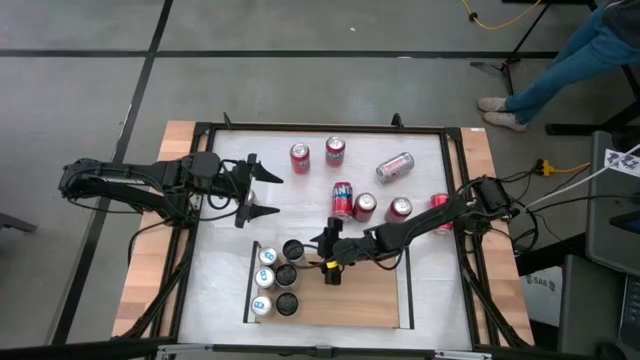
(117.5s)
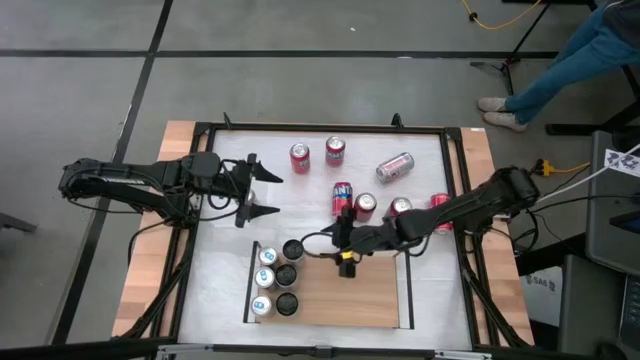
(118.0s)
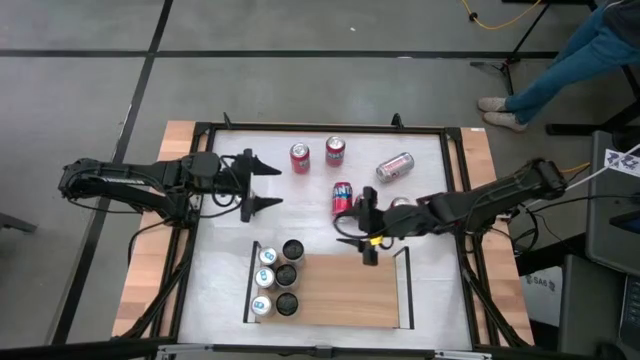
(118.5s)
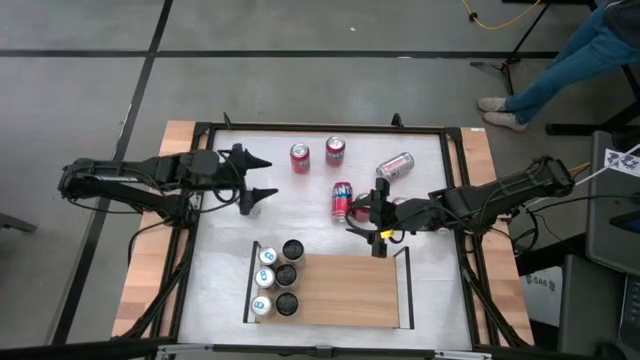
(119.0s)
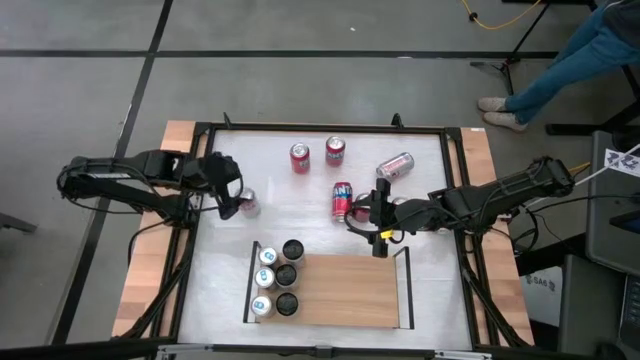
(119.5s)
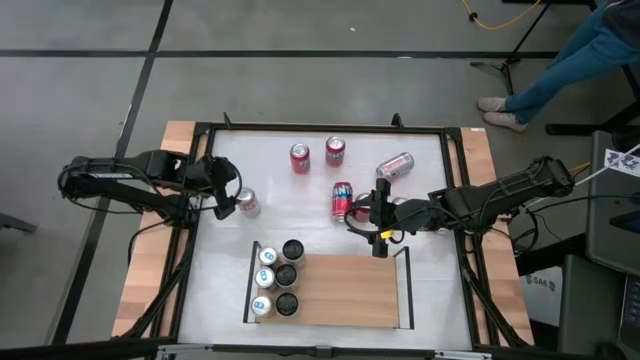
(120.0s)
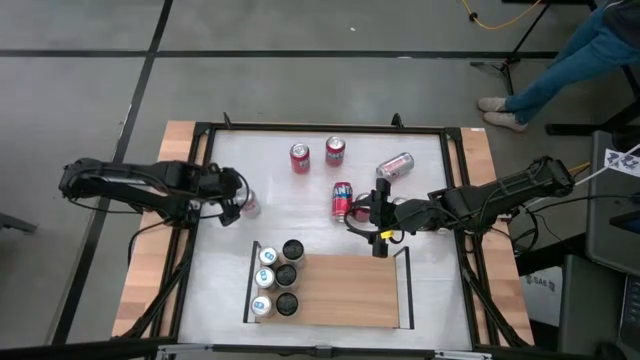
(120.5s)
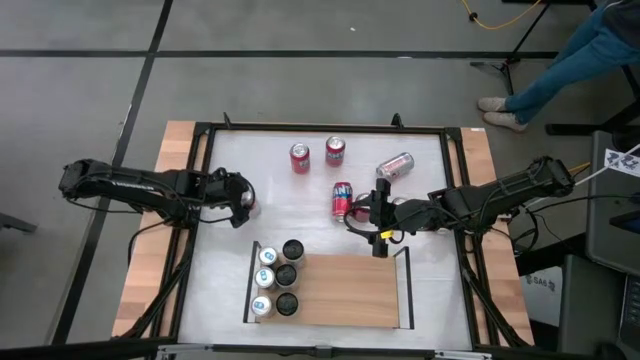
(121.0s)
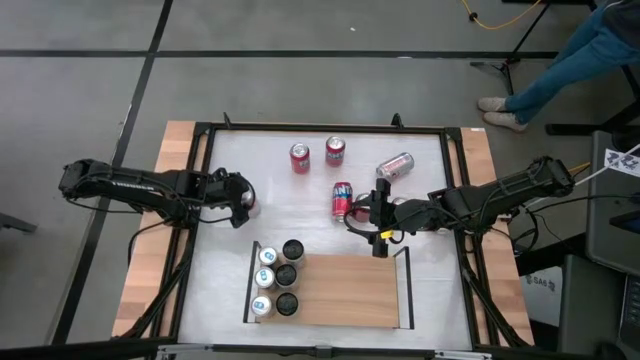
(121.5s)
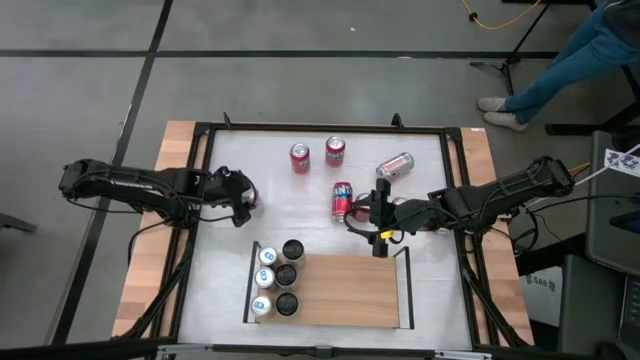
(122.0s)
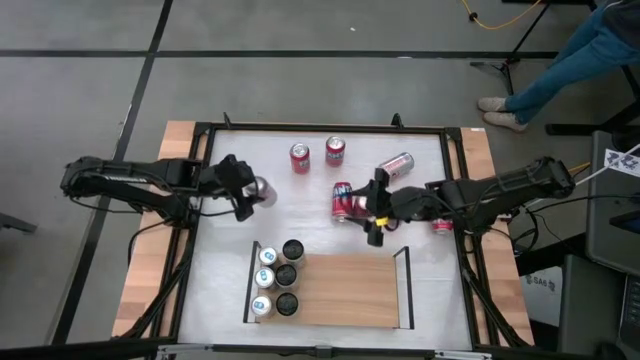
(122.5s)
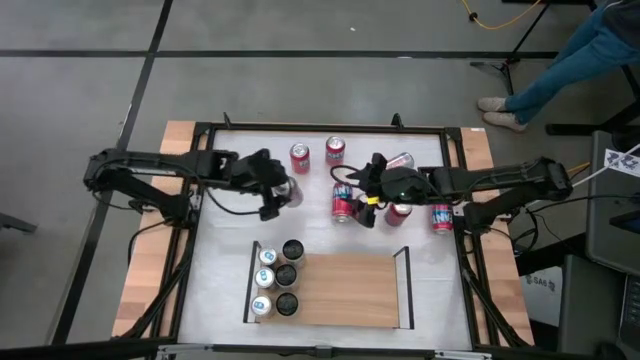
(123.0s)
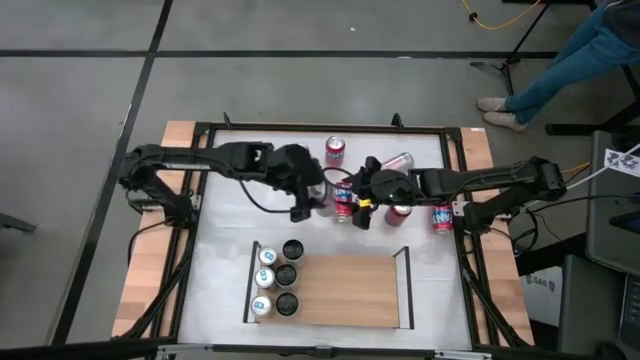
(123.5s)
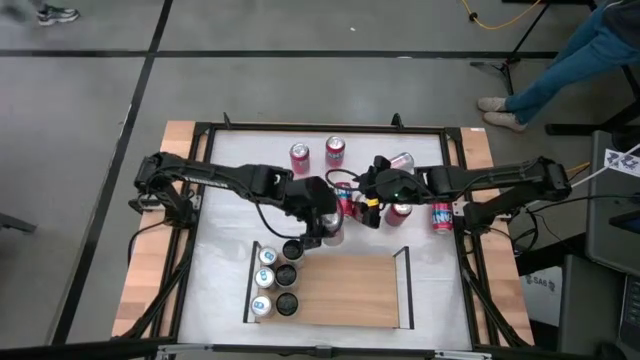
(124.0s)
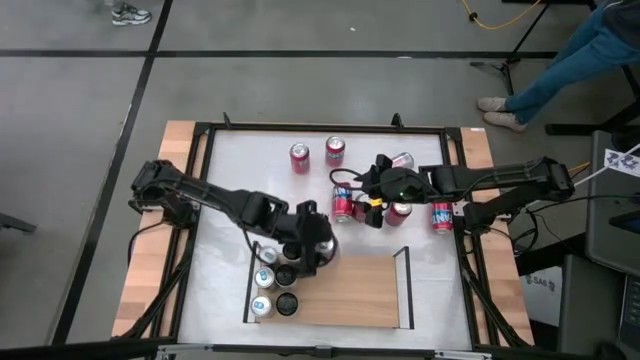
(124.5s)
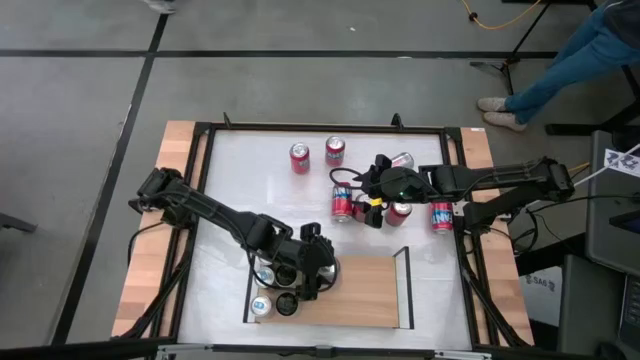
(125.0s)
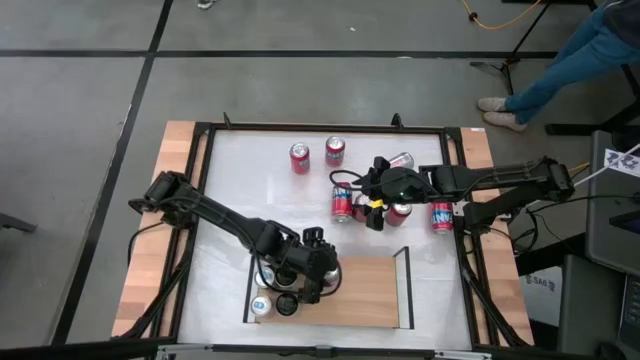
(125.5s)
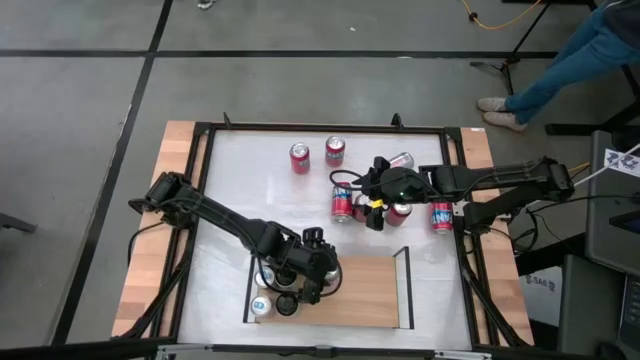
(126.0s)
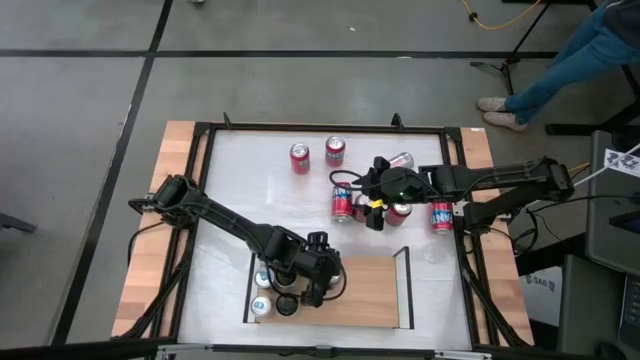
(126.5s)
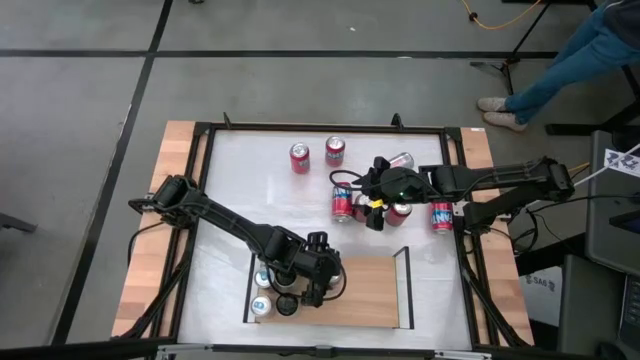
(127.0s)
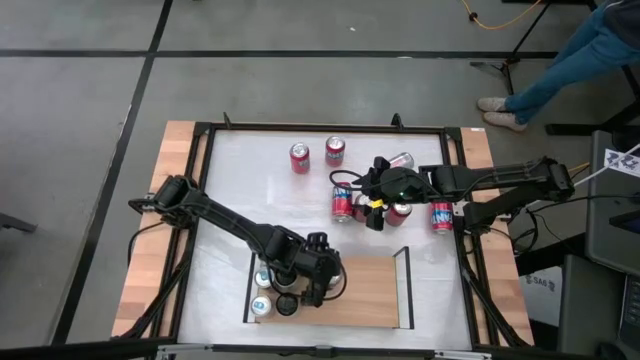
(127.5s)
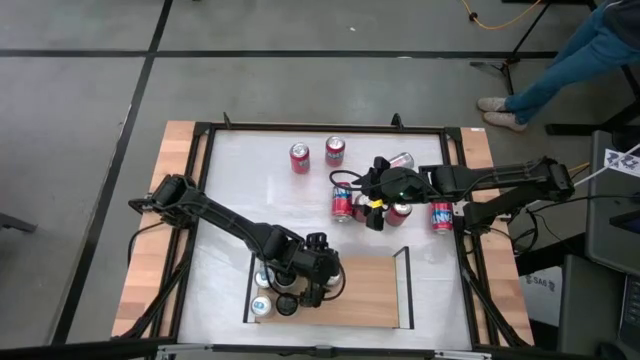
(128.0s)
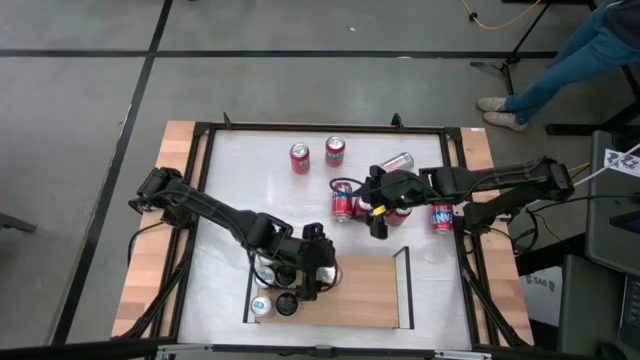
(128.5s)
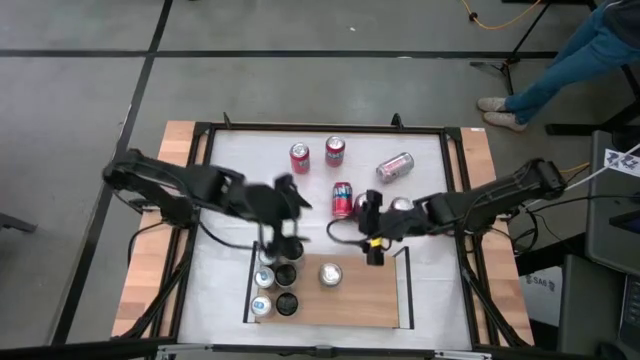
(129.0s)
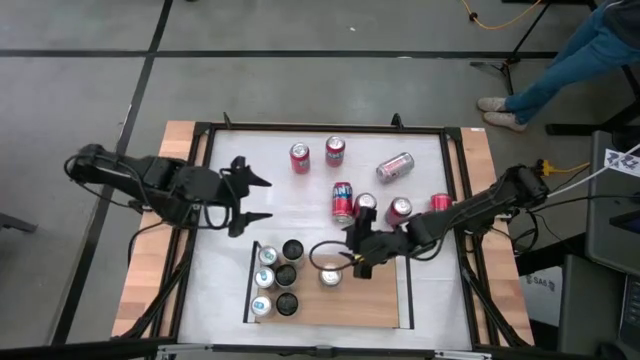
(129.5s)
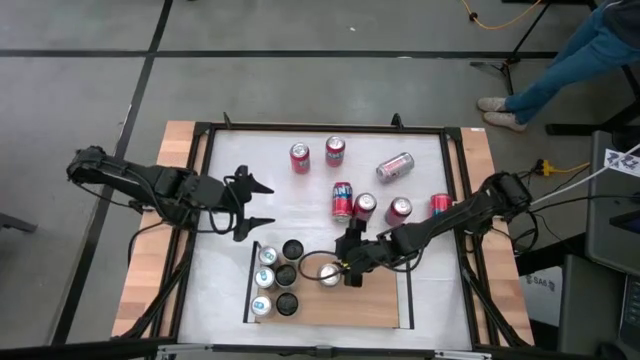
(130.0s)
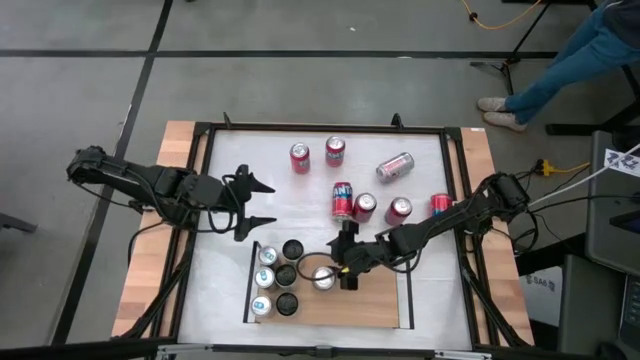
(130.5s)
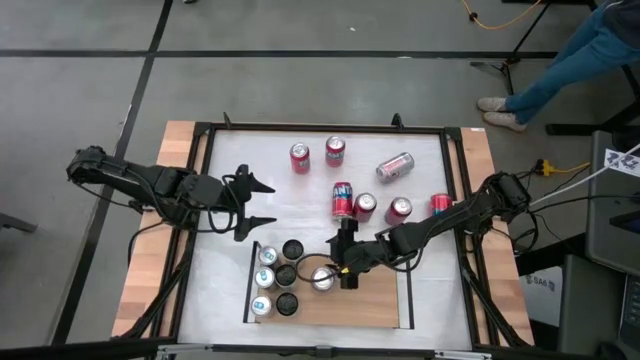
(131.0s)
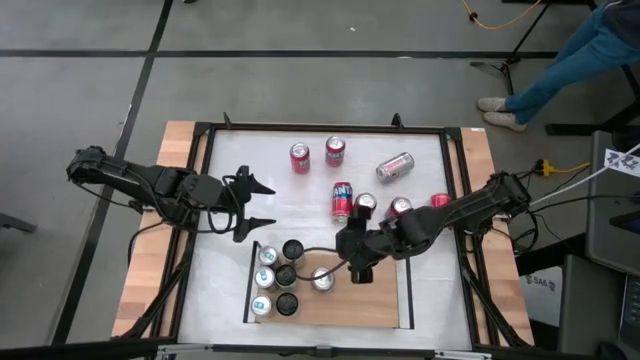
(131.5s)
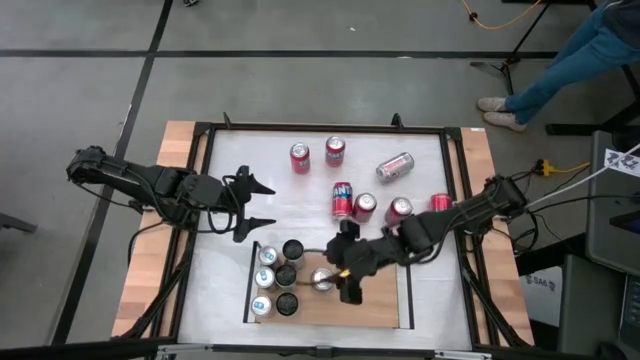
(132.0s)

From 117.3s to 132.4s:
Task: Place canned beverage on shelf
Put the left silver soda can on the shelf
